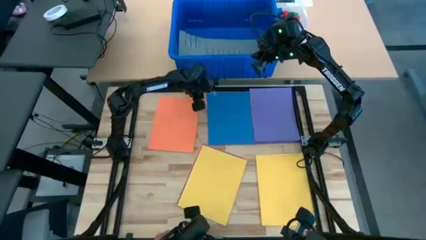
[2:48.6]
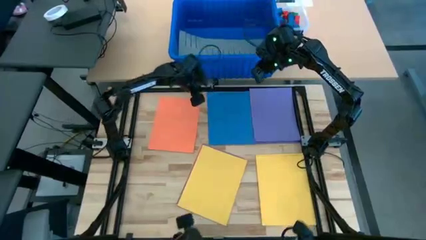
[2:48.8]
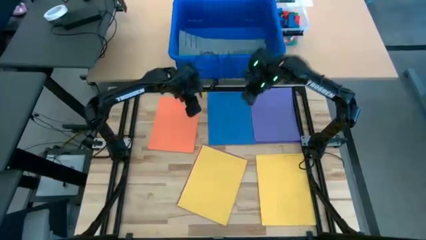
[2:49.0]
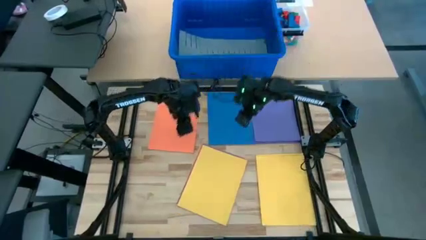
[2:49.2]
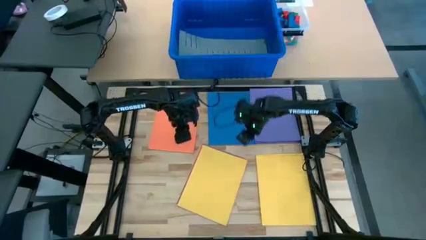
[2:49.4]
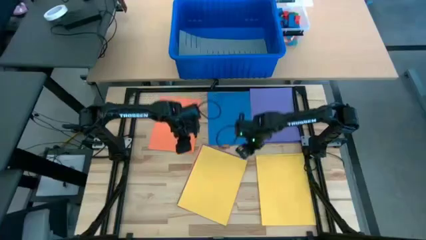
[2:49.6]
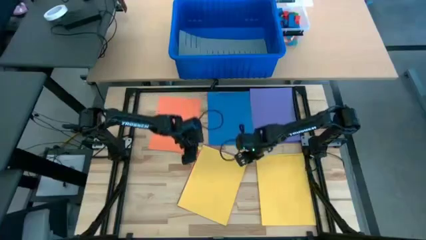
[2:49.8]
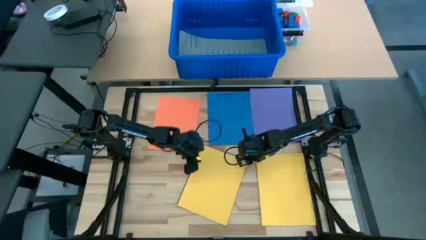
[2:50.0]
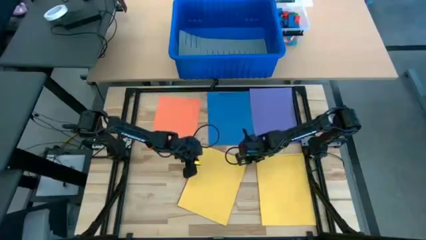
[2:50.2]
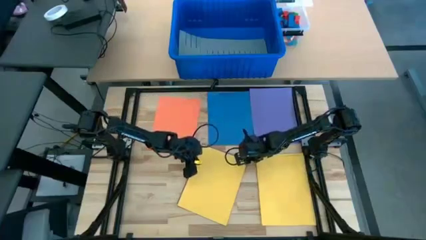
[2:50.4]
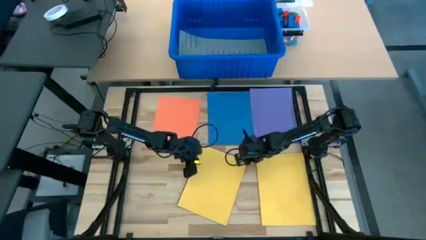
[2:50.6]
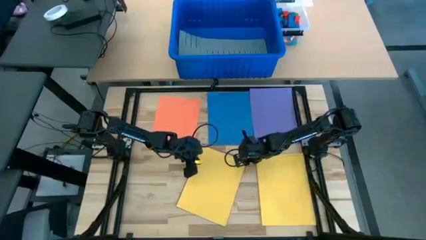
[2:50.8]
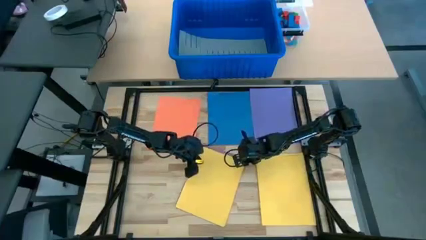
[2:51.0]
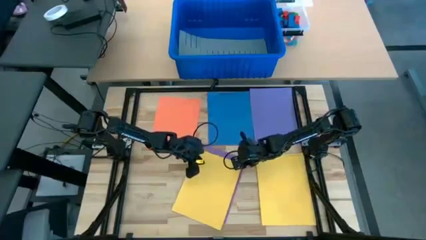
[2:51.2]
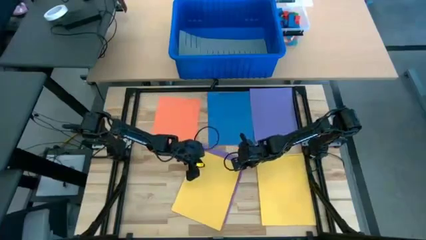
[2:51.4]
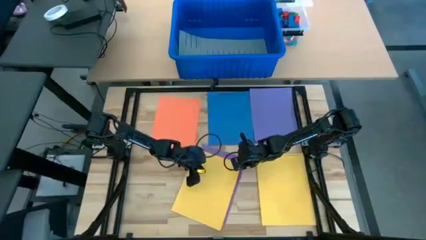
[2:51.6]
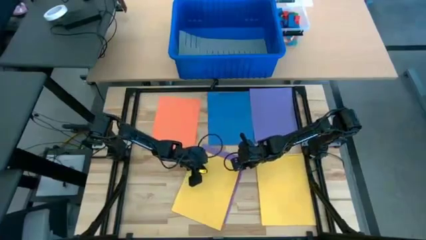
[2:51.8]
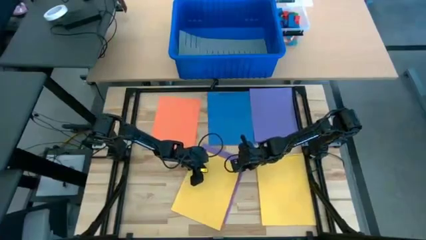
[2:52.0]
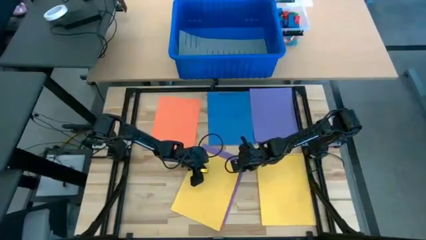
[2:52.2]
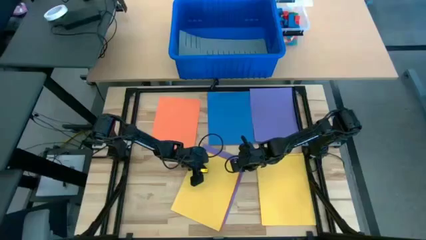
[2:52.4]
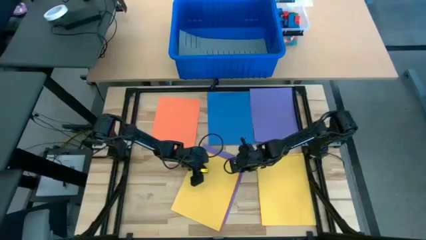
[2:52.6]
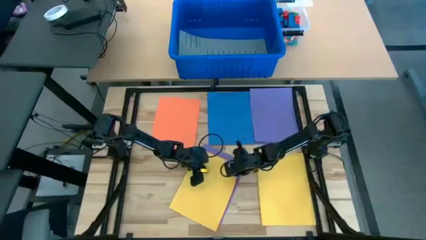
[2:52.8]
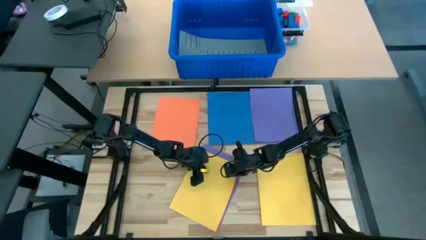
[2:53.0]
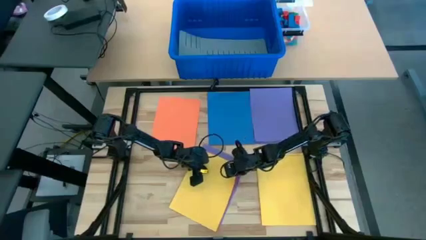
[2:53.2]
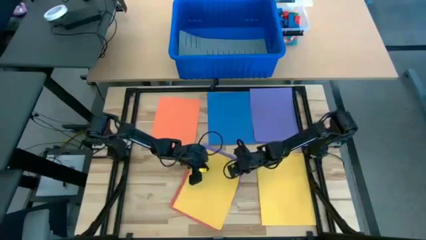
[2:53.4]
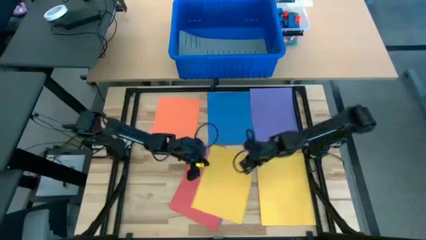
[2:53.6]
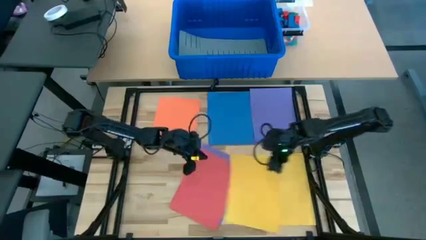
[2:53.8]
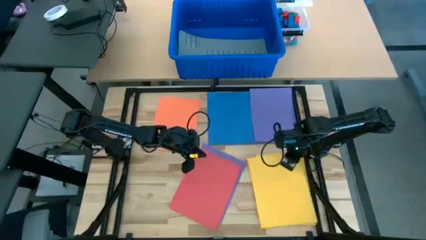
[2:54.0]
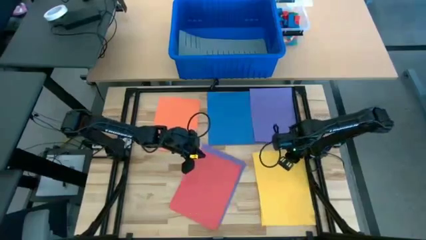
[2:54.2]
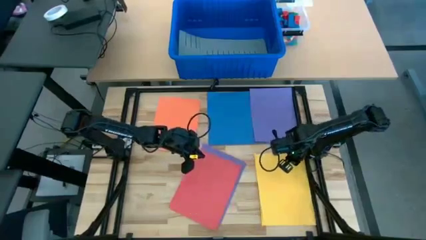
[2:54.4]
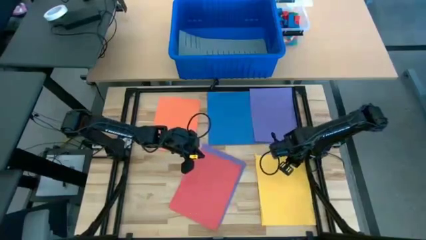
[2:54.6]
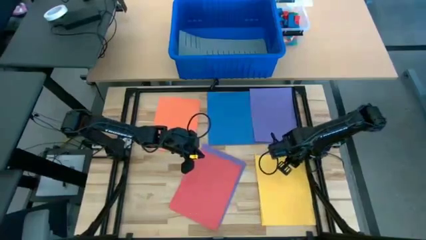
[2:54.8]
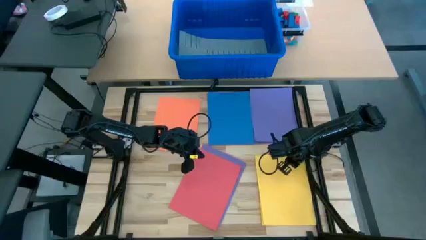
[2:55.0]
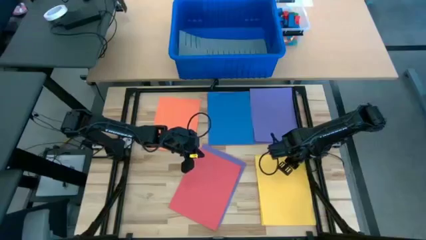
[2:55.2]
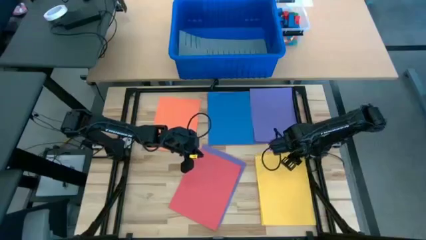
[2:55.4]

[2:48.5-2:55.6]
Task: Organize paper
Stack the yellow paper on top of the other yellow papers

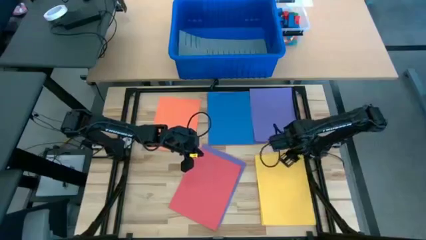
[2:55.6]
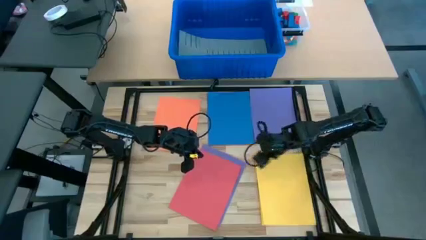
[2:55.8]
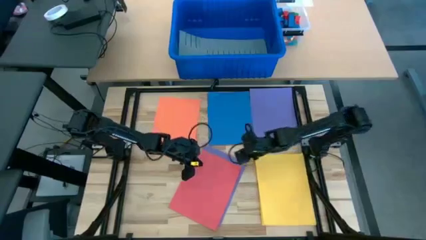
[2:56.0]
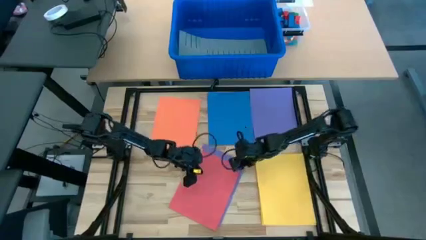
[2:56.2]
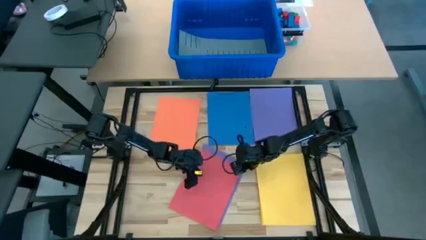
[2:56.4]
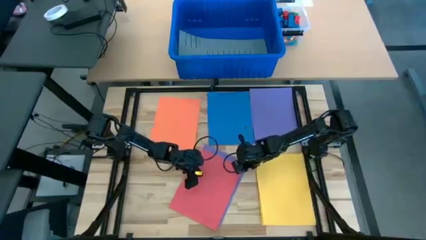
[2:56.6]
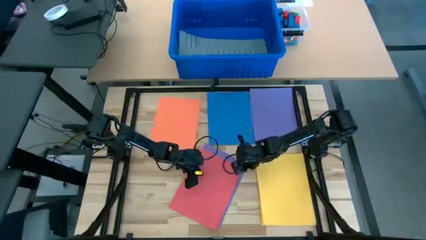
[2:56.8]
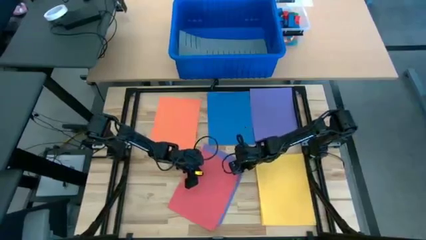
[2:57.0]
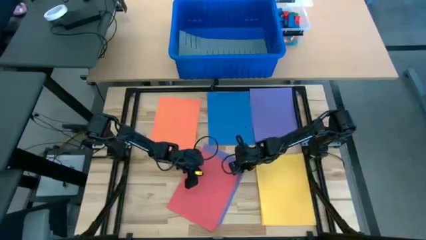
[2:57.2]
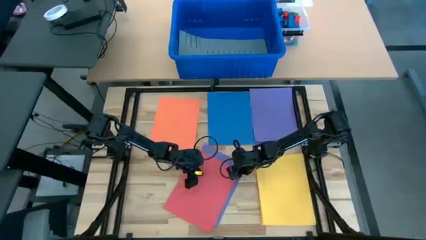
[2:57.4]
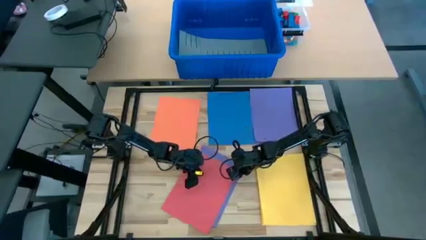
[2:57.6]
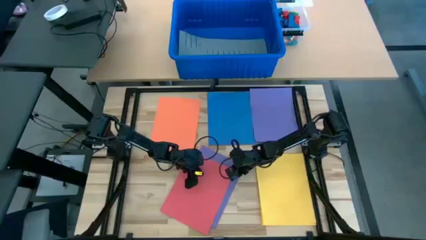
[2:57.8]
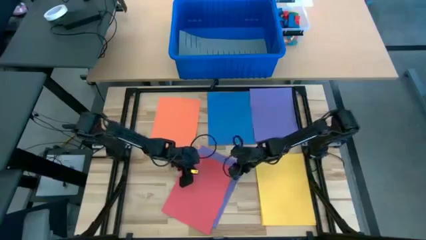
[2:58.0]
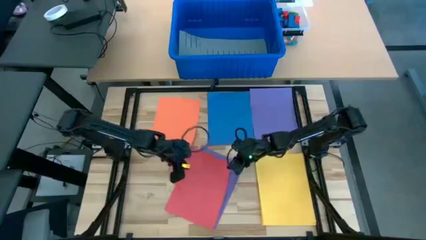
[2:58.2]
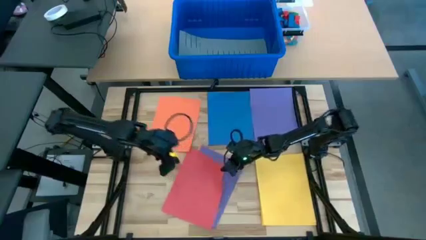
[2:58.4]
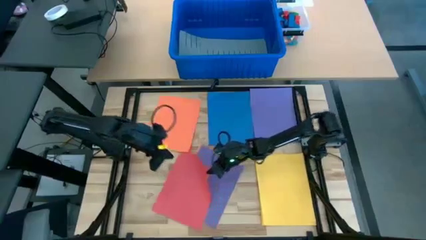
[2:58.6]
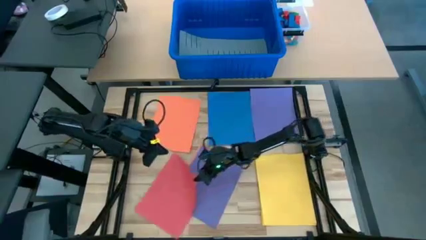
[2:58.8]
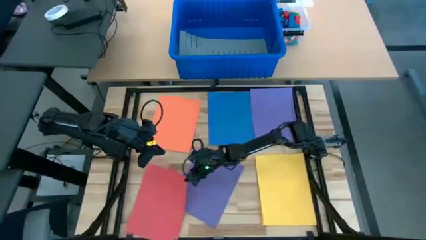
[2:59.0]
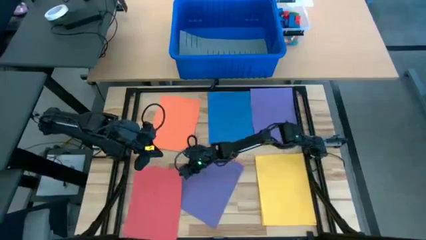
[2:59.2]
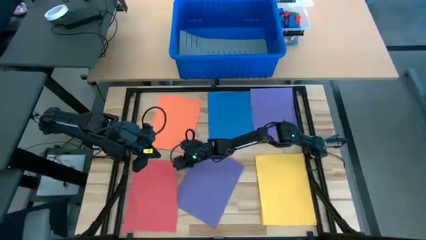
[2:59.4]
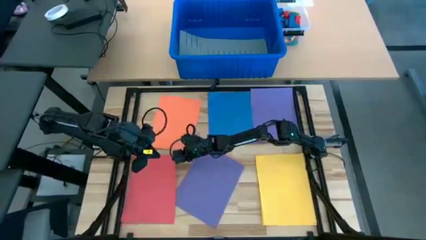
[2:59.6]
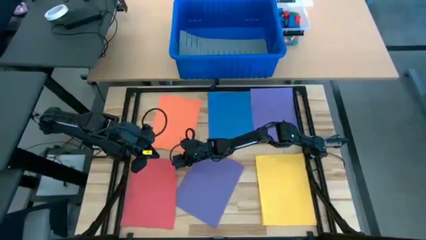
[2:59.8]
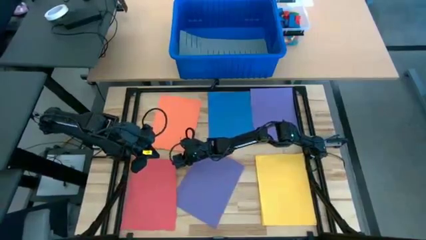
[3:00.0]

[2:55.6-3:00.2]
Put the red paper on the table

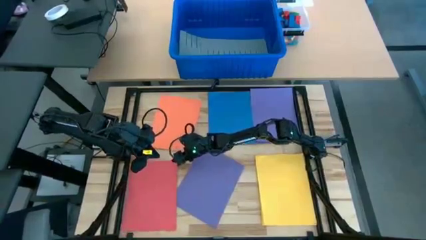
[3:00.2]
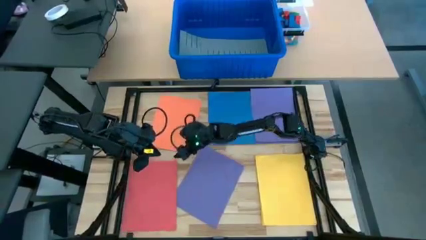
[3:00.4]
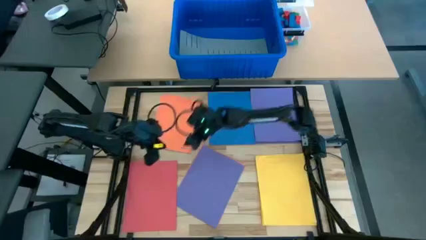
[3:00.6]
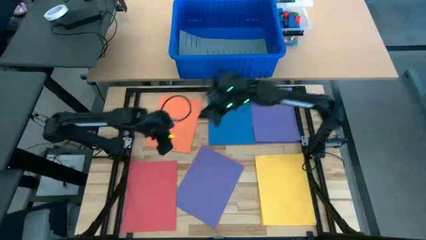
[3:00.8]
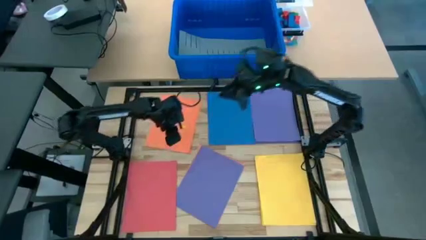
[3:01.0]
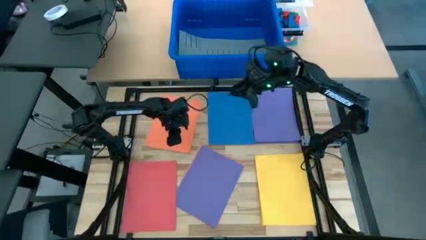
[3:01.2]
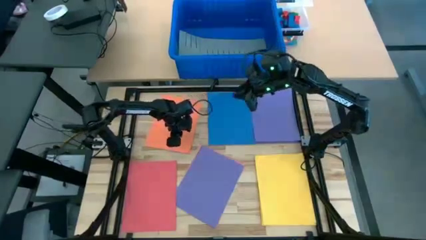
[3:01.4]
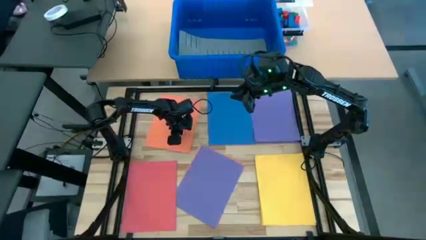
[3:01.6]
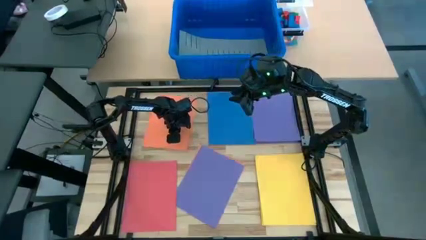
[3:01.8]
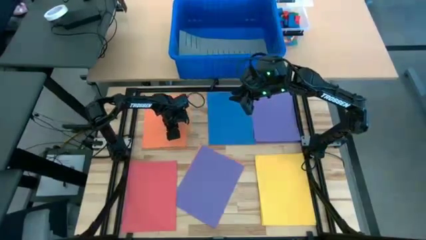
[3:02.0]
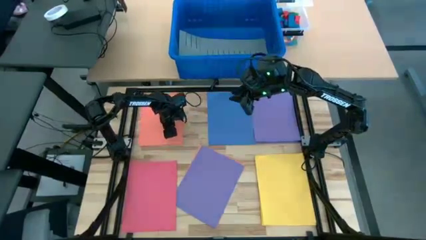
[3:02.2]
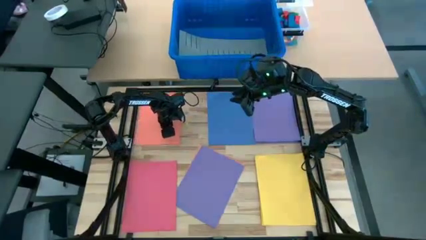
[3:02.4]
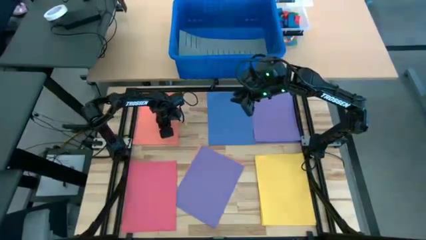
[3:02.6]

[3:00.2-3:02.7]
Adjust the orange paper on the table
